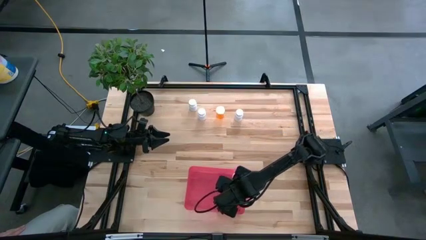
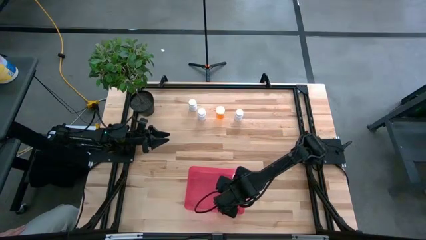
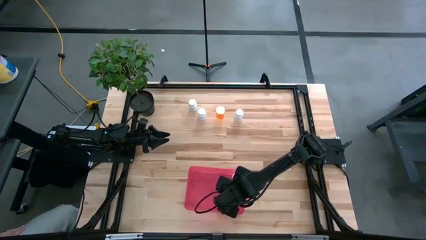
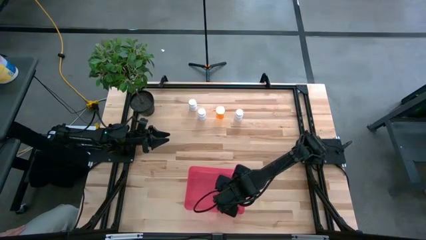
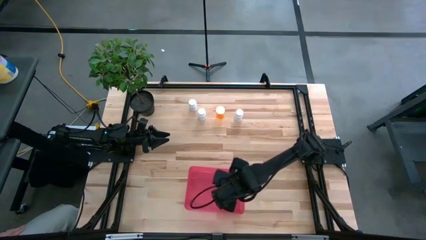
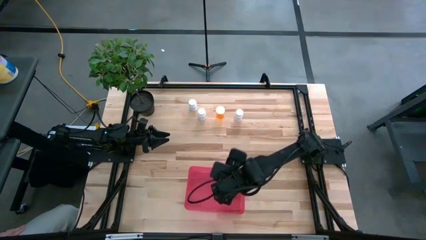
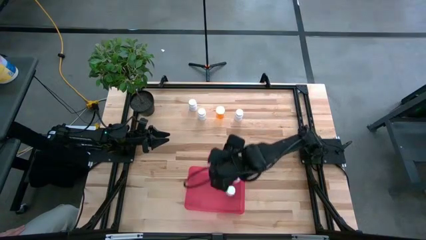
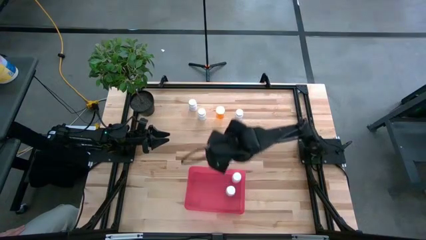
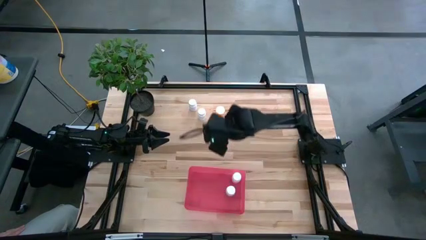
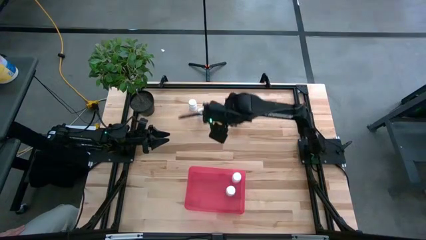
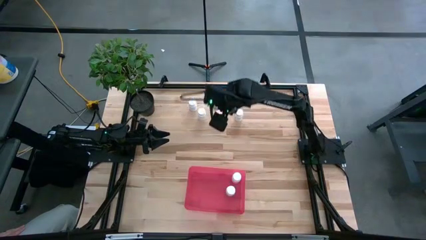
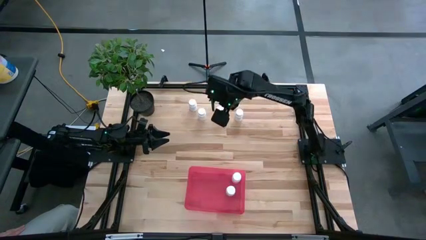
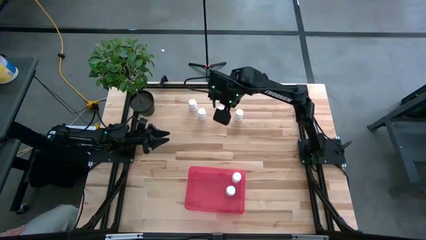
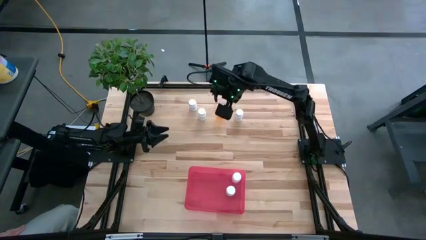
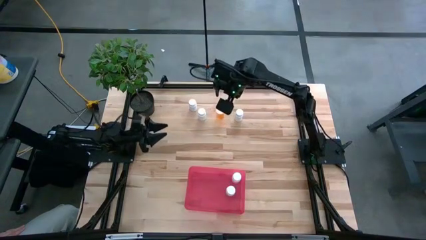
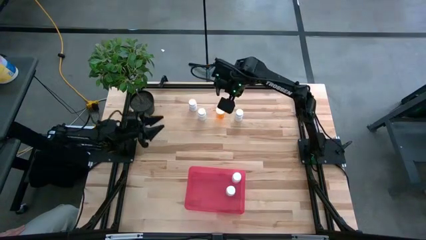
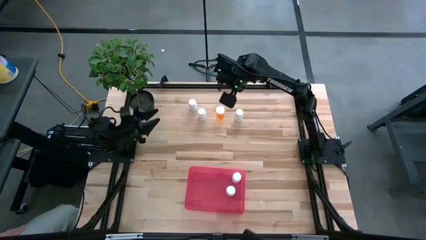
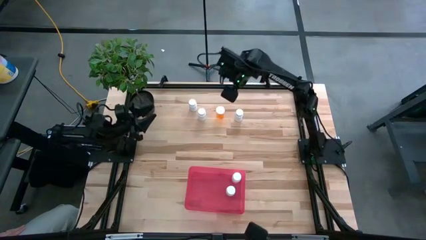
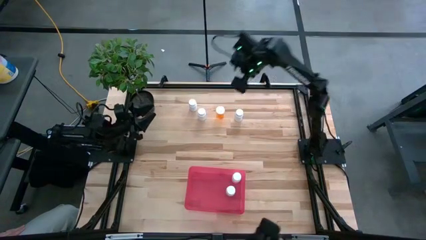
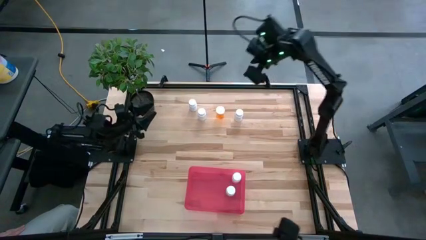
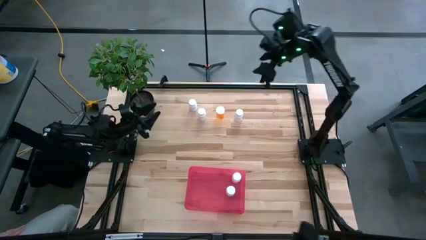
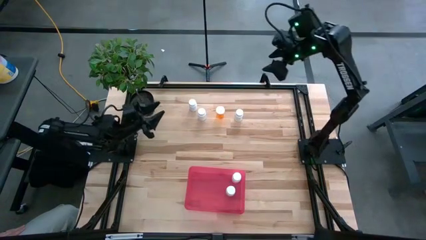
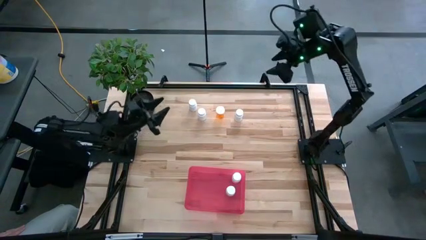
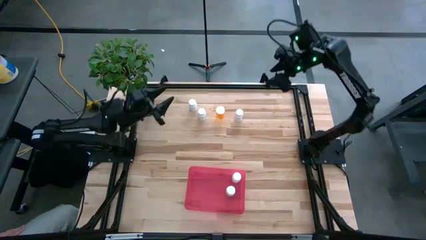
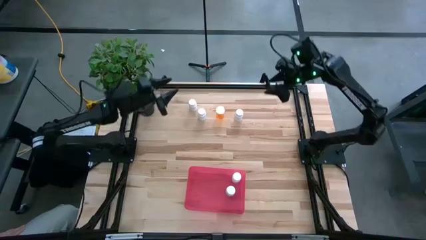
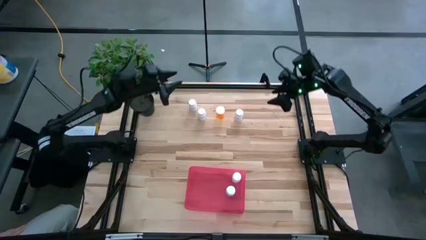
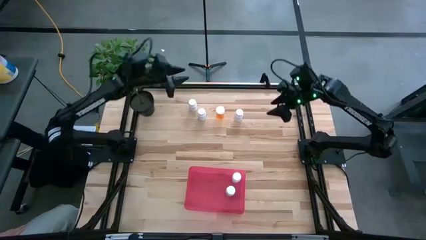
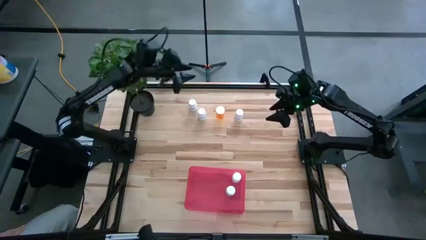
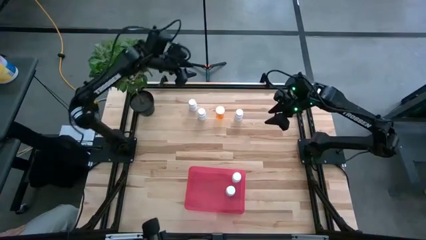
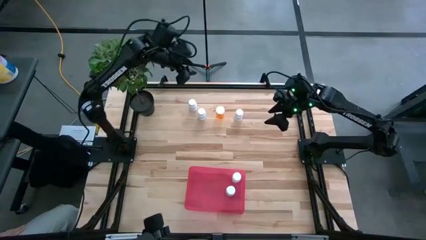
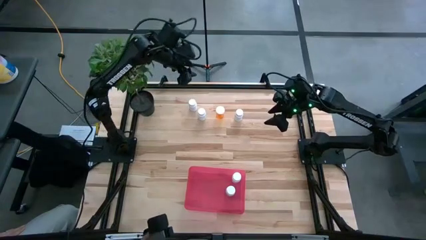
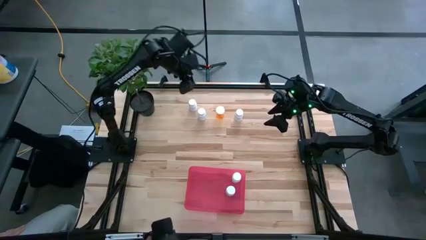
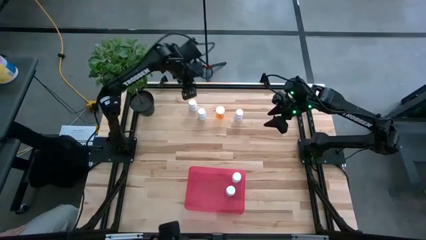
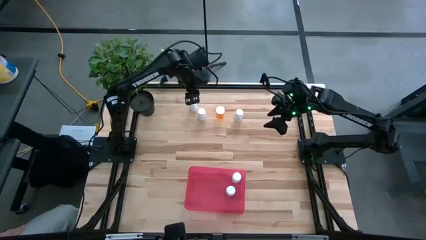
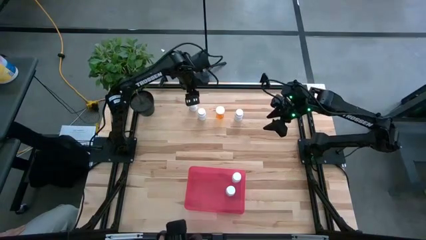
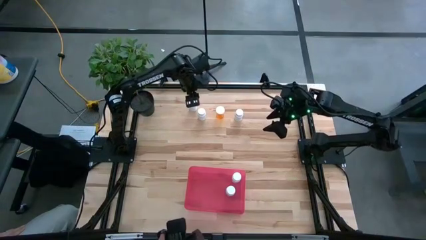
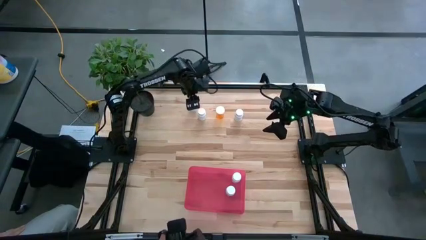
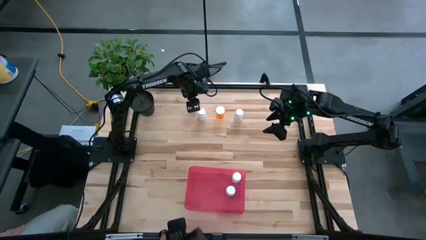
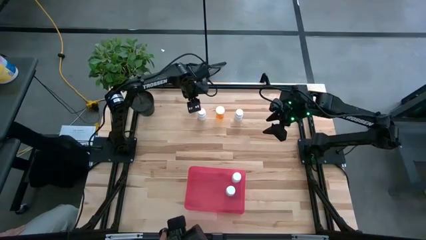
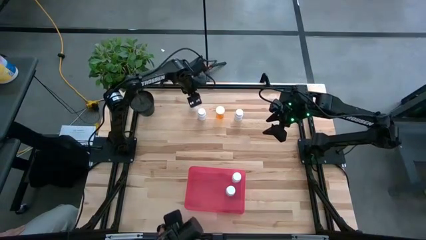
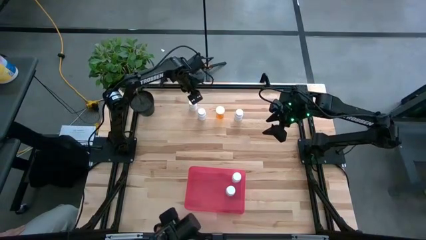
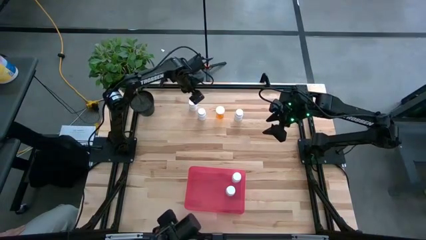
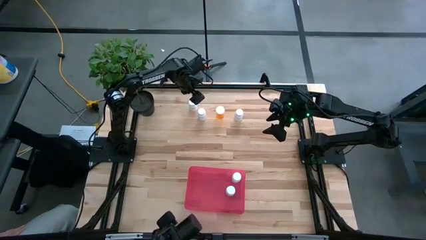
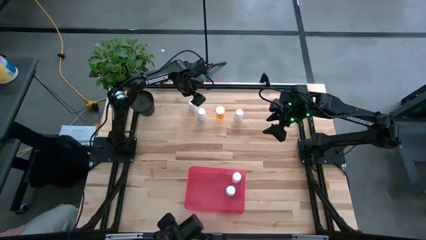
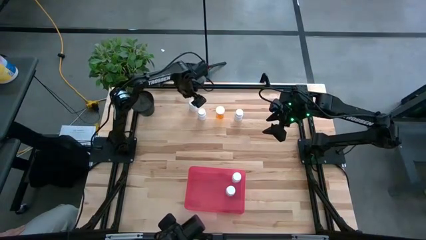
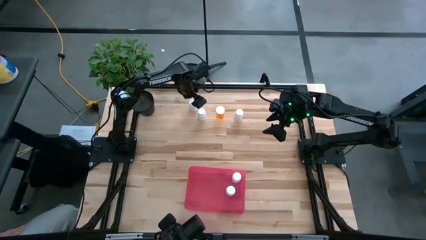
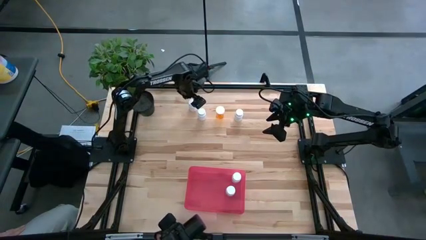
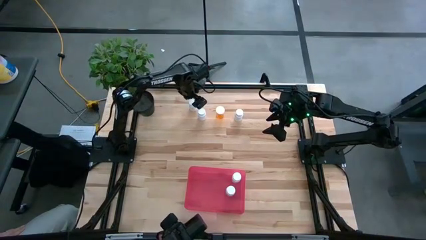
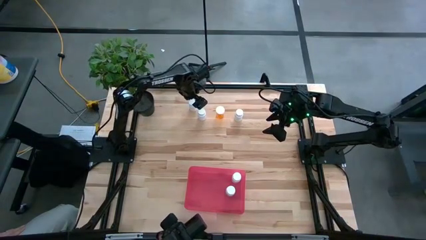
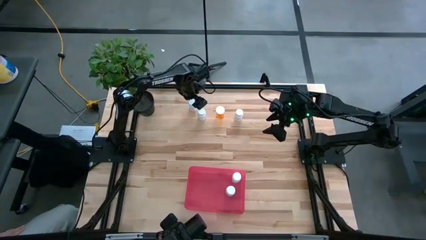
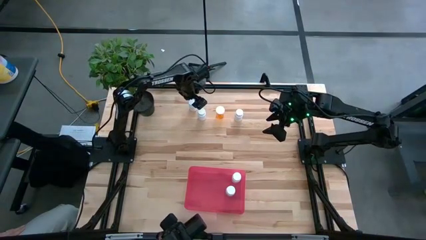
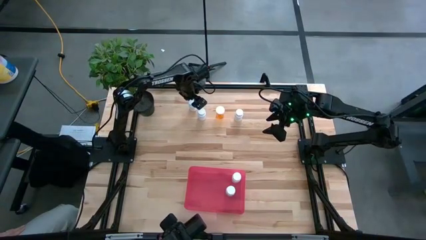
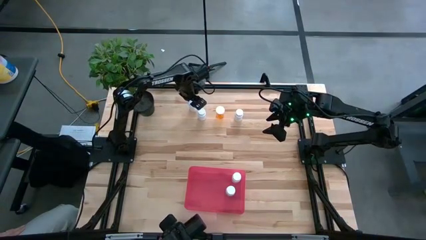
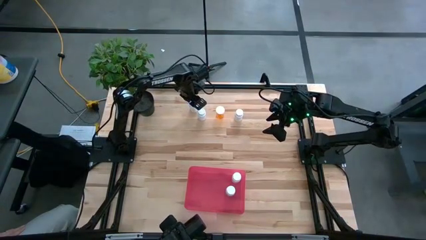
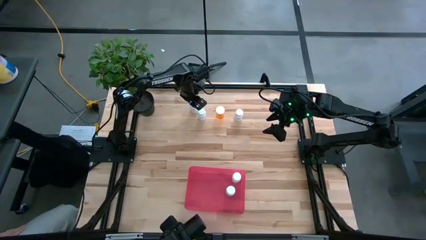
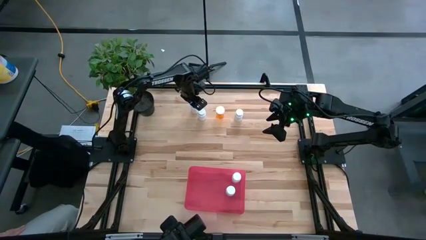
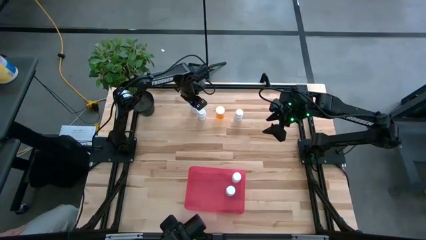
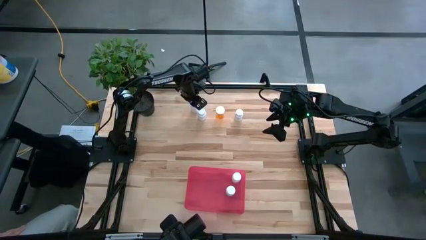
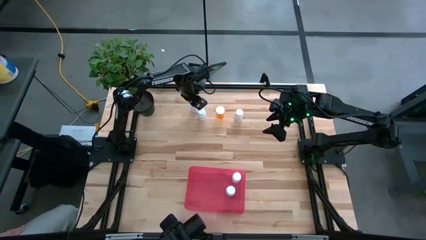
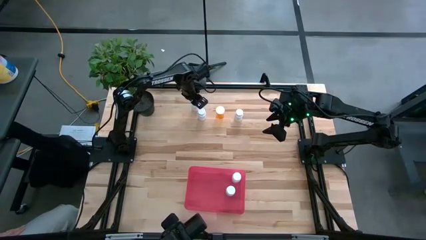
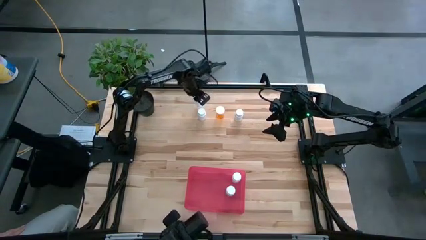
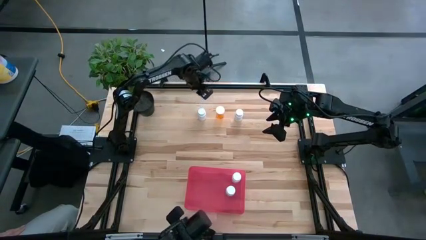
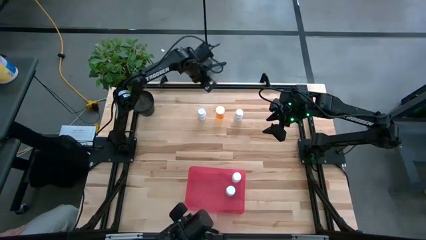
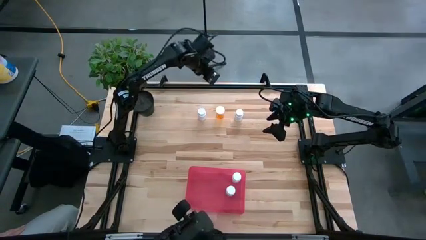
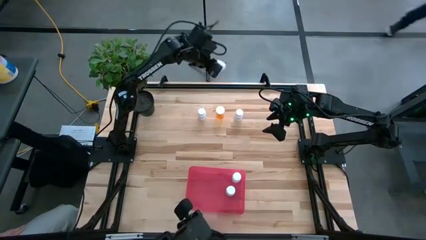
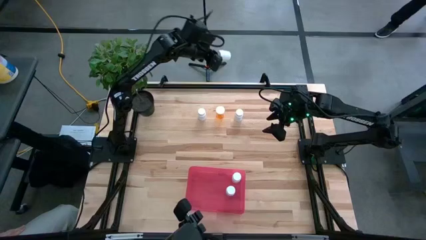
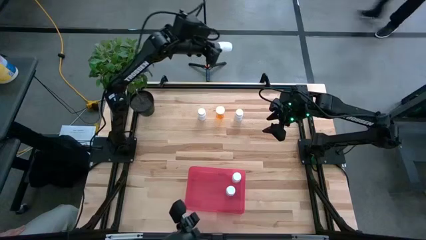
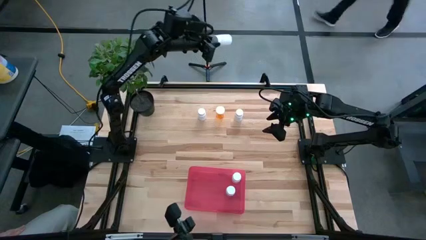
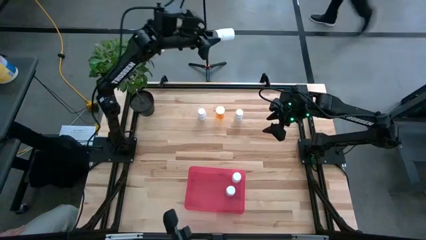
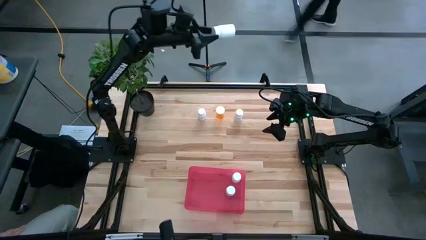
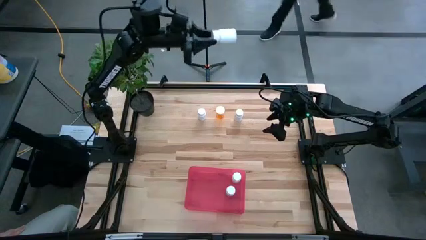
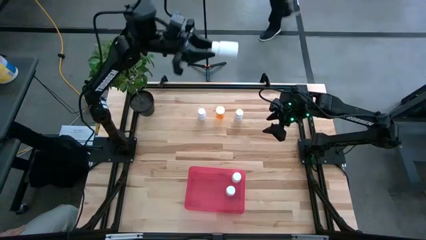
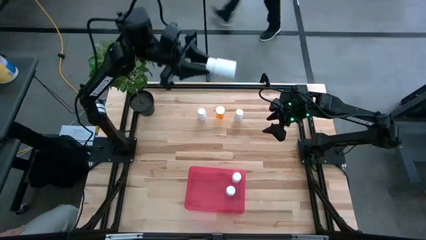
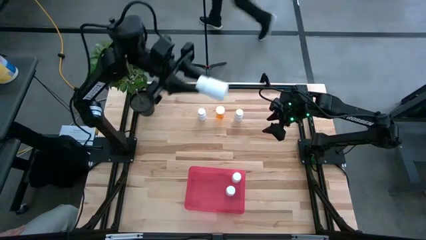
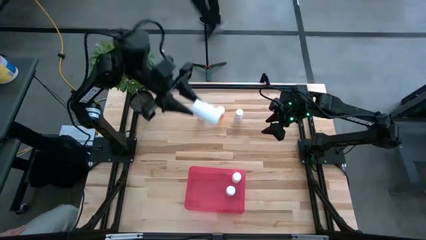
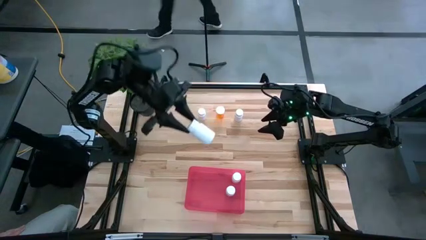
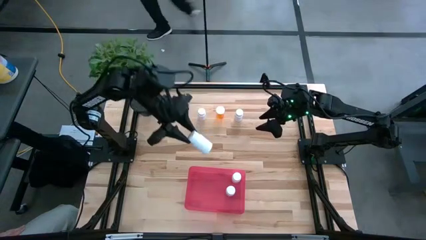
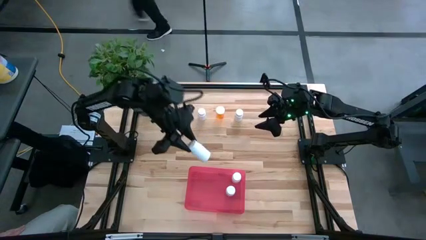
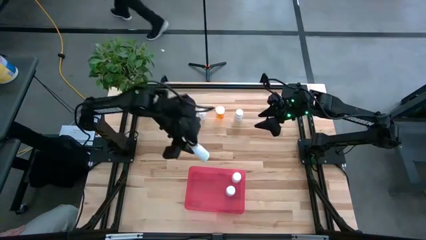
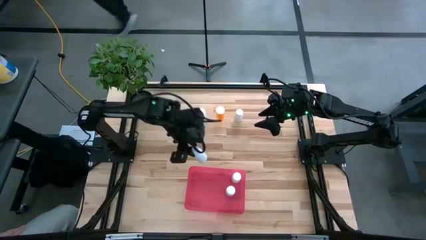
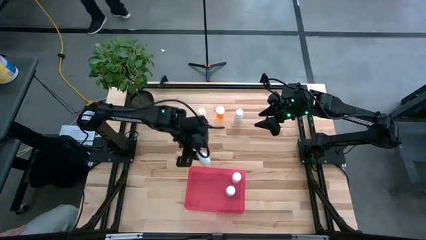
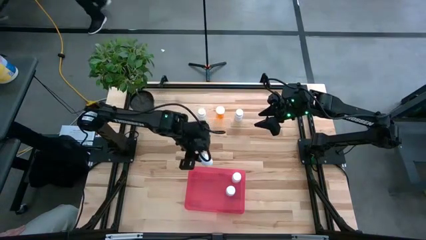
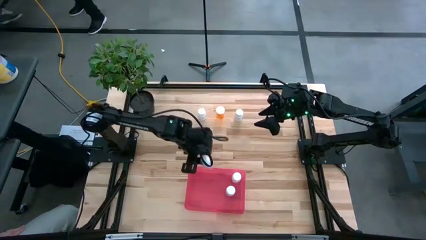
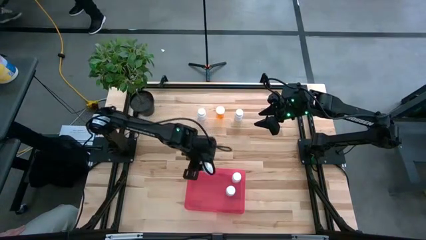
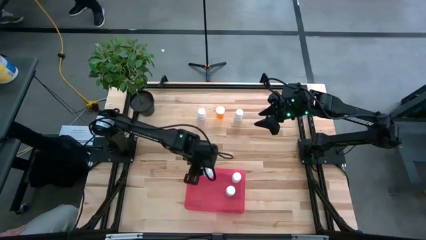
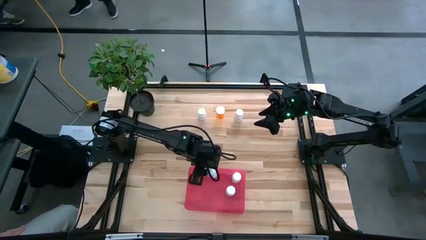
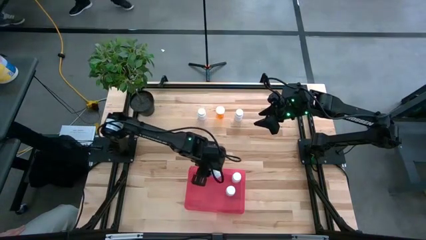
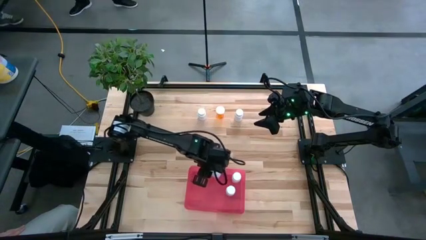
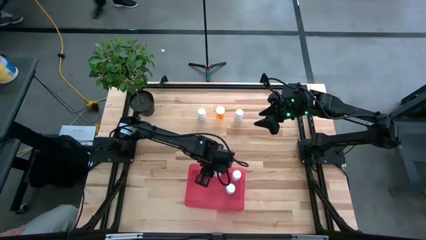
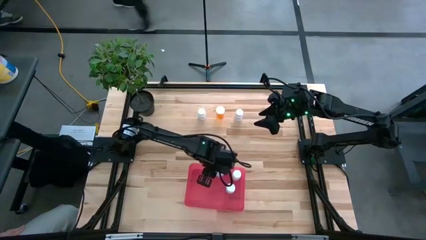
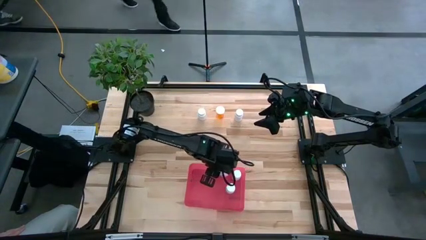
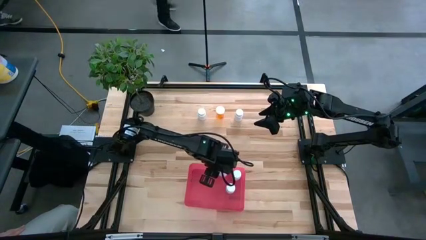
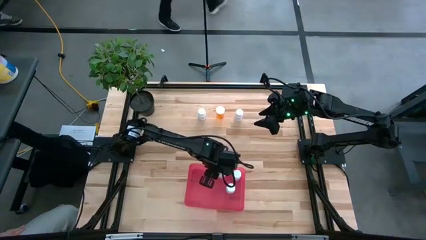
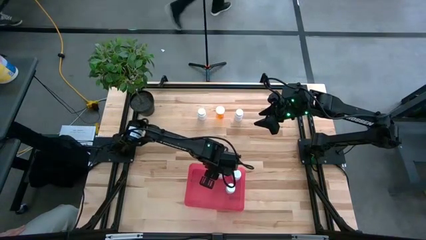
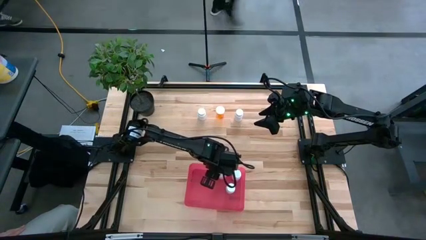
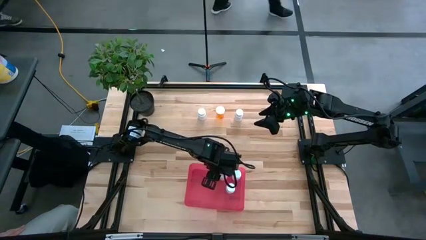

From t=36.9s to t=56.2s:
Task: Pick and place pill bottles into a basket
Put the white pill bottle into the red bin
